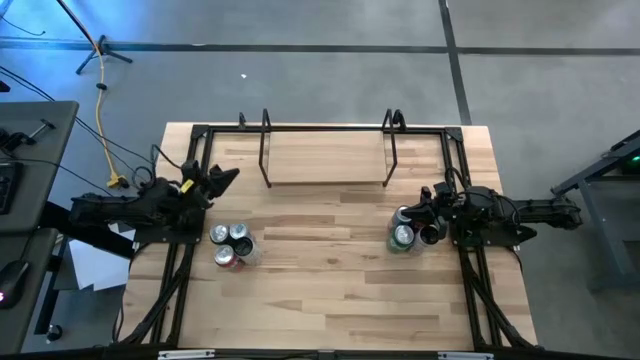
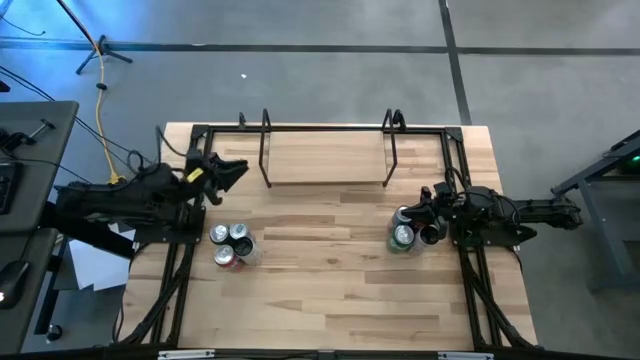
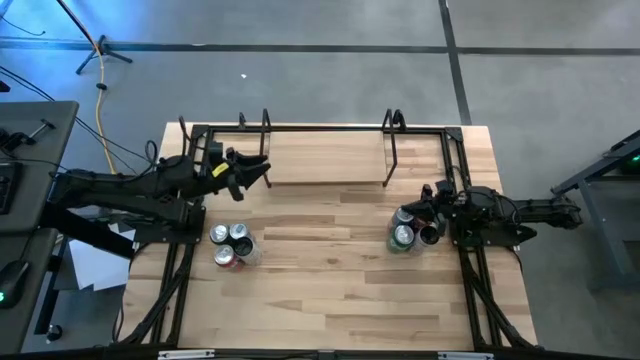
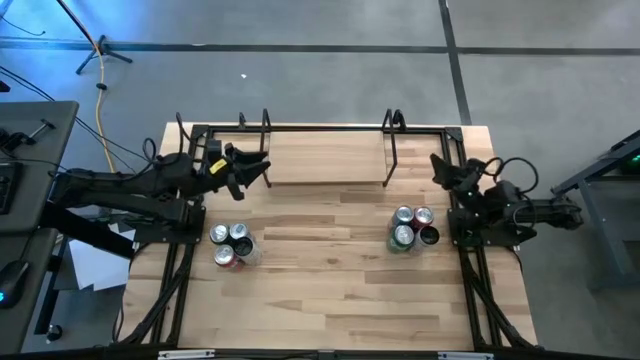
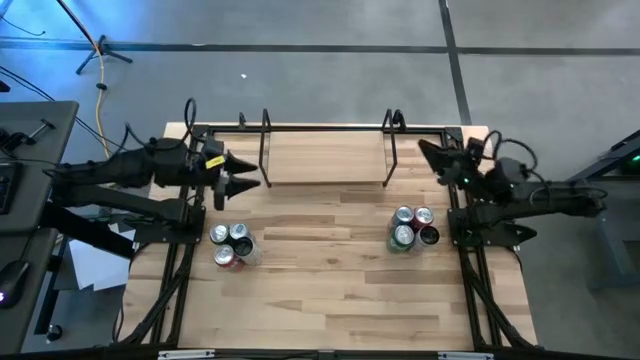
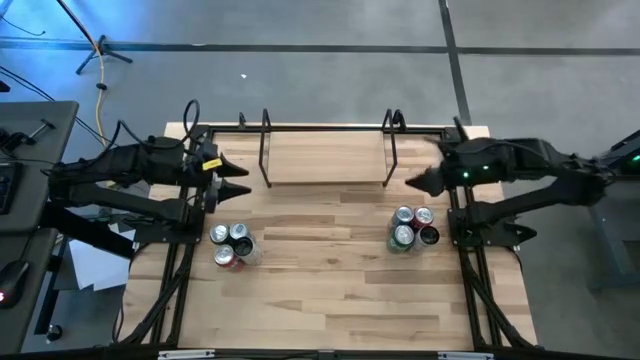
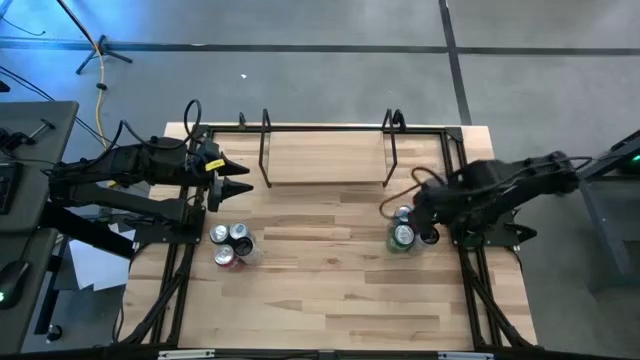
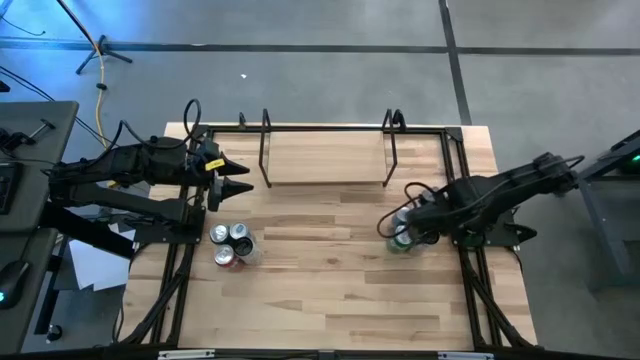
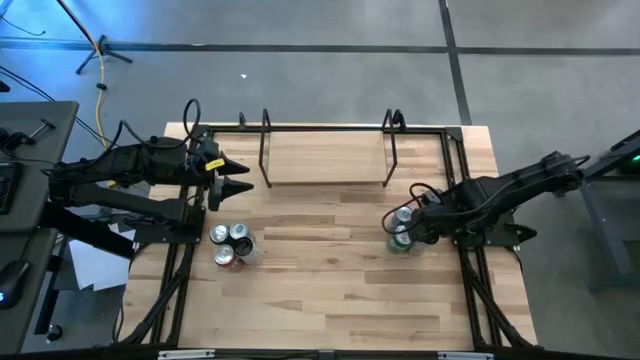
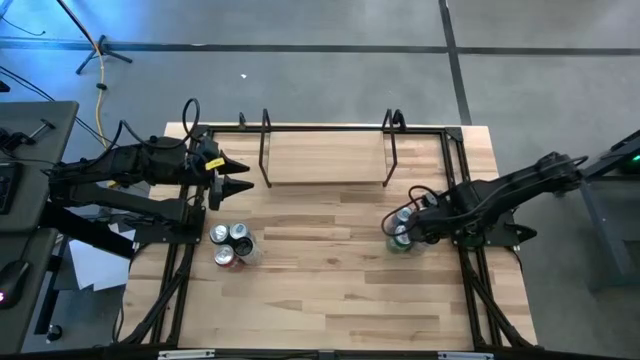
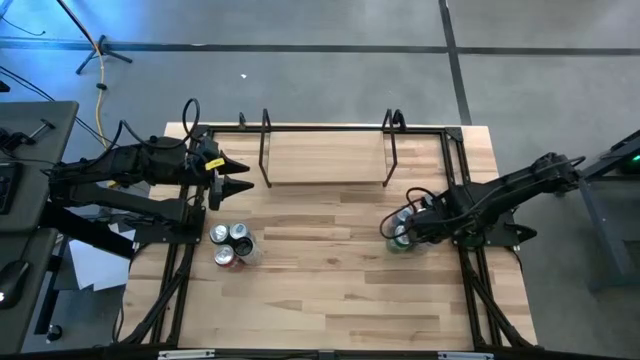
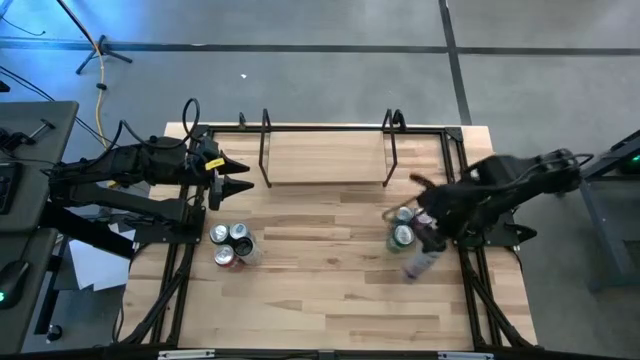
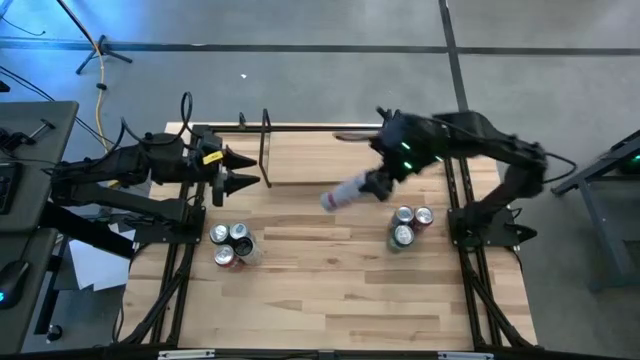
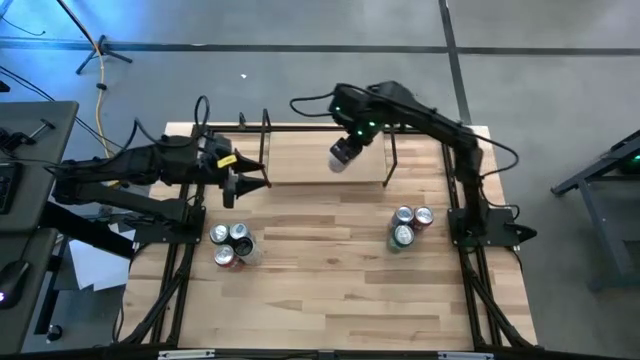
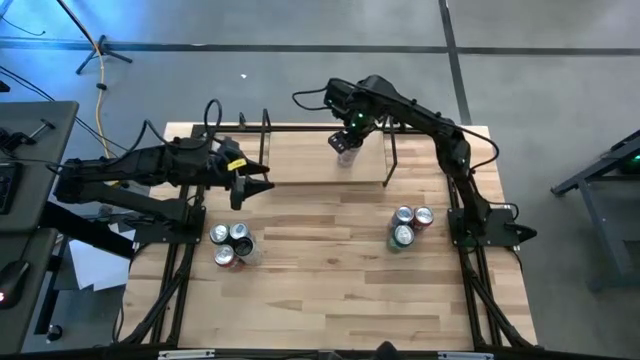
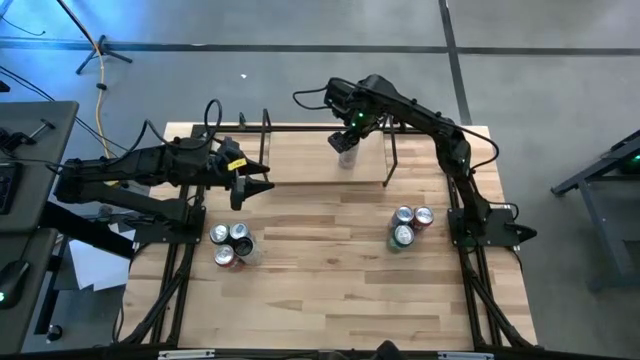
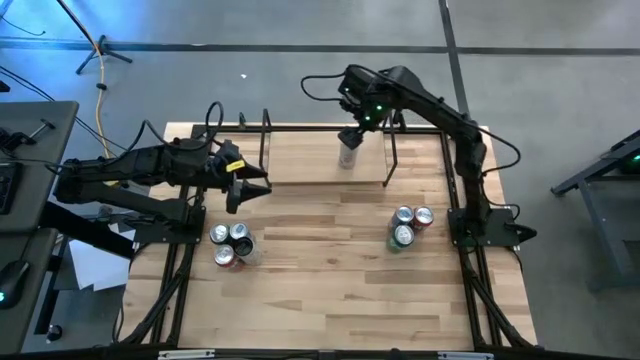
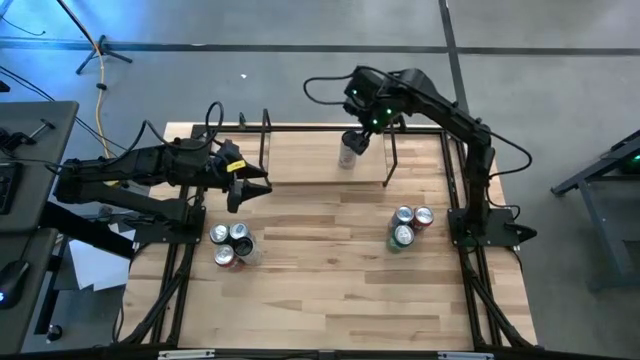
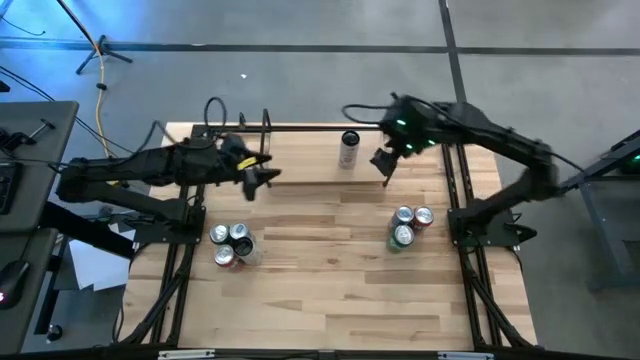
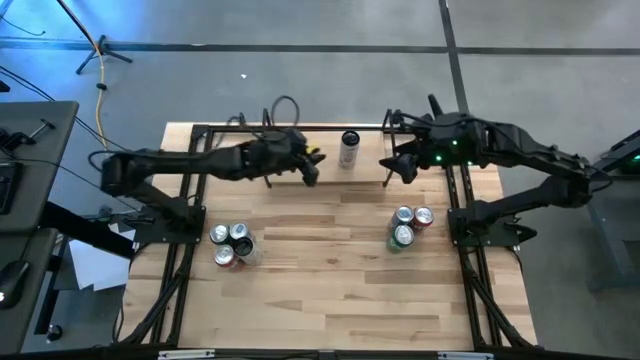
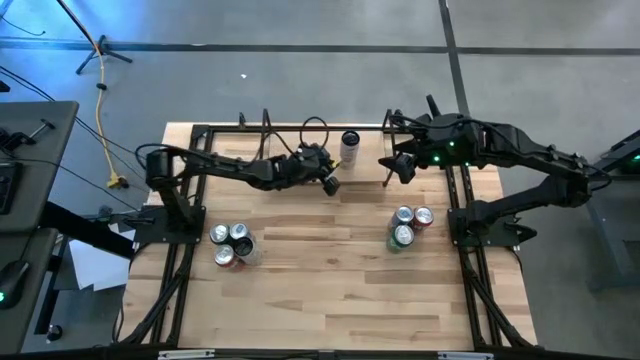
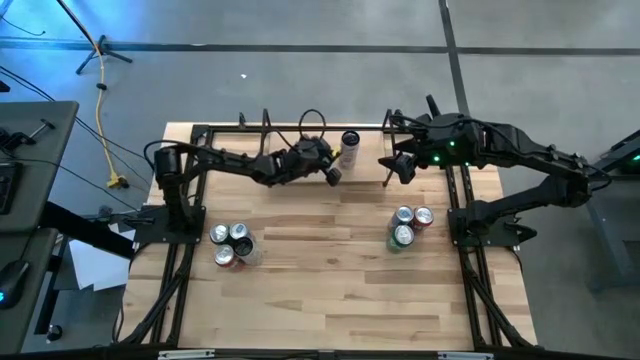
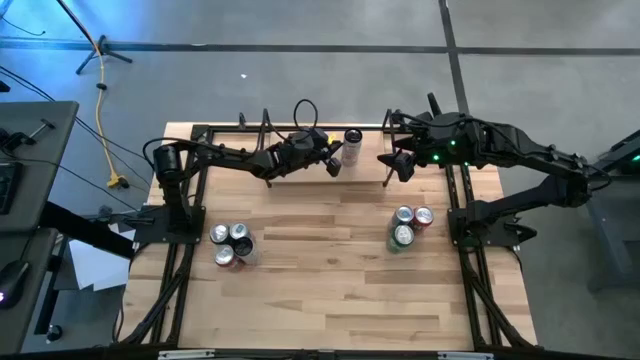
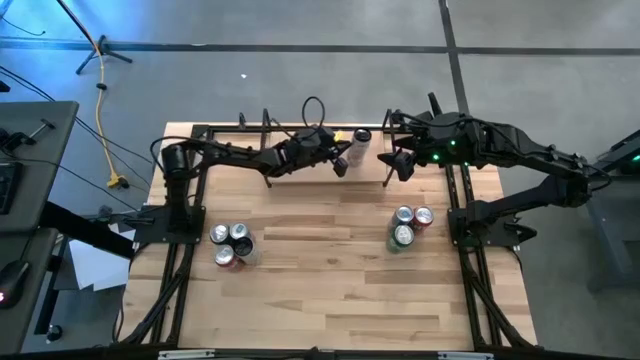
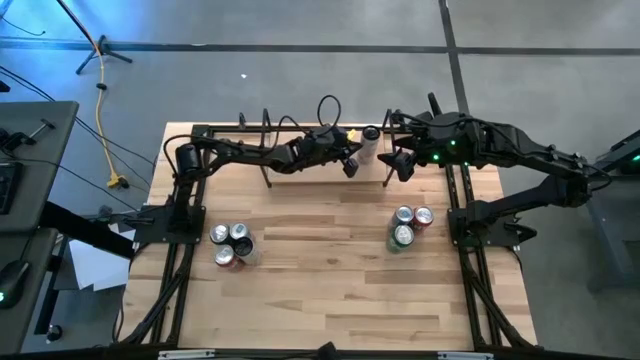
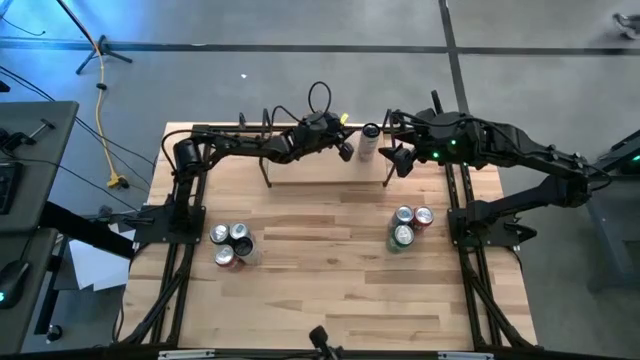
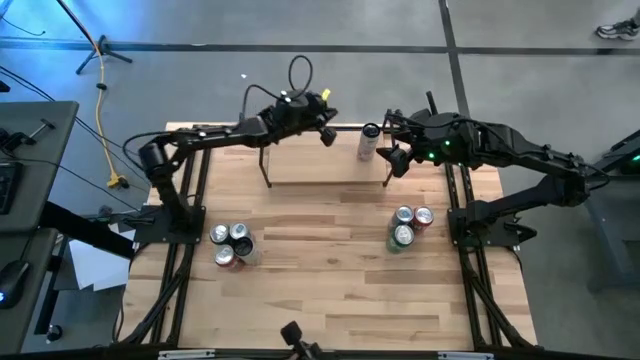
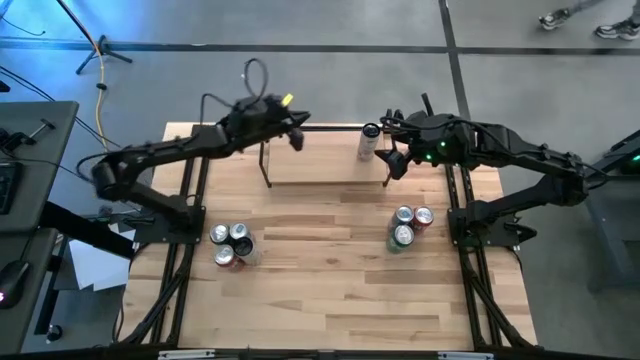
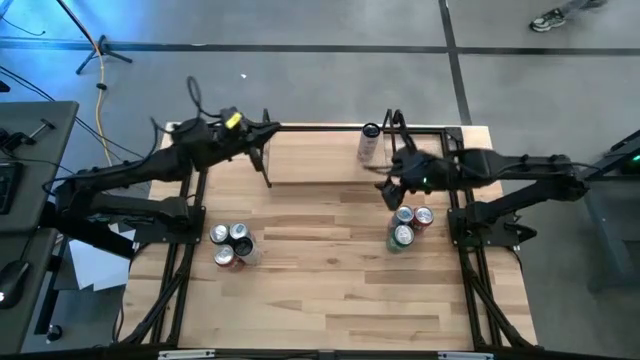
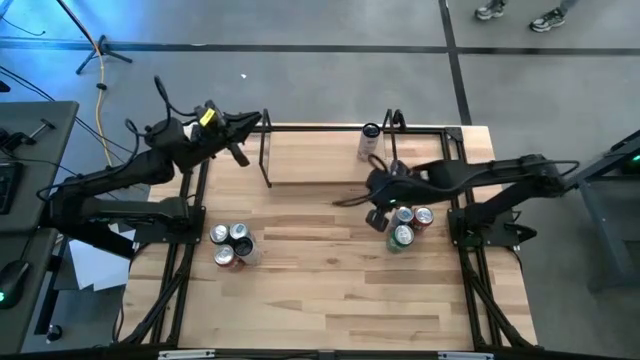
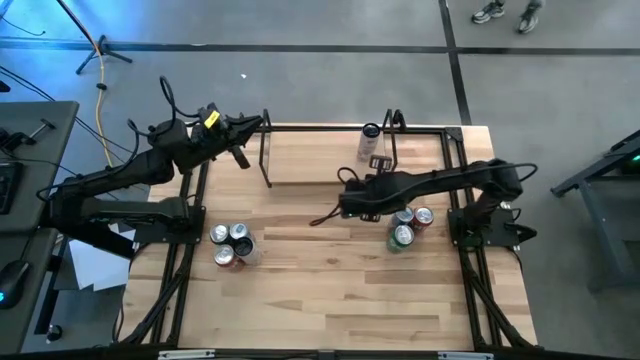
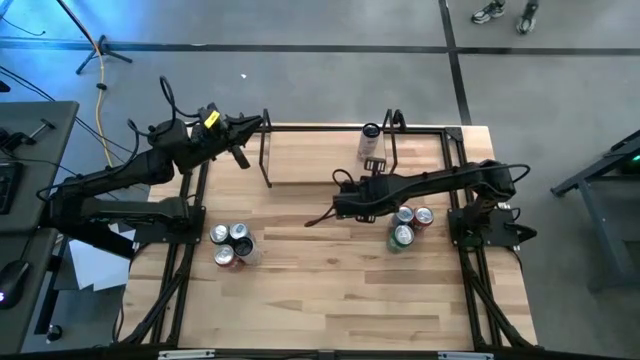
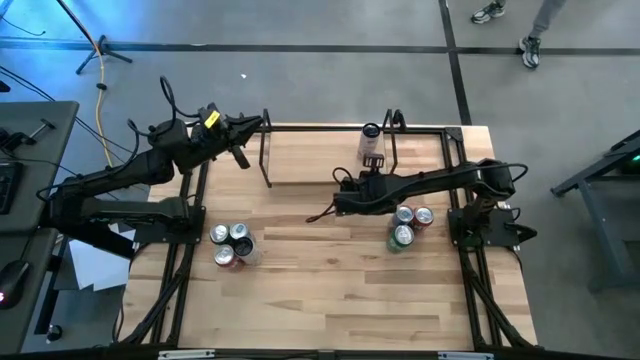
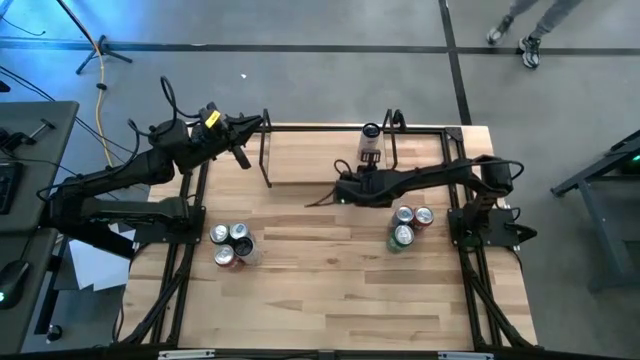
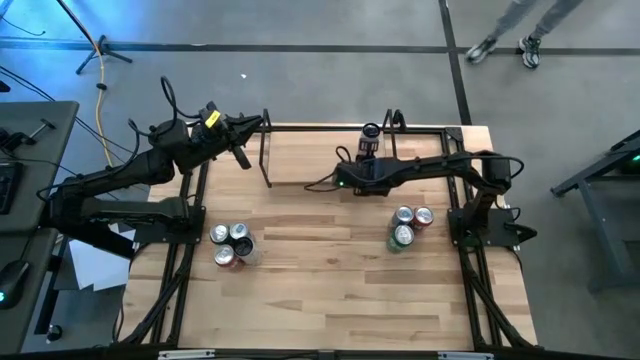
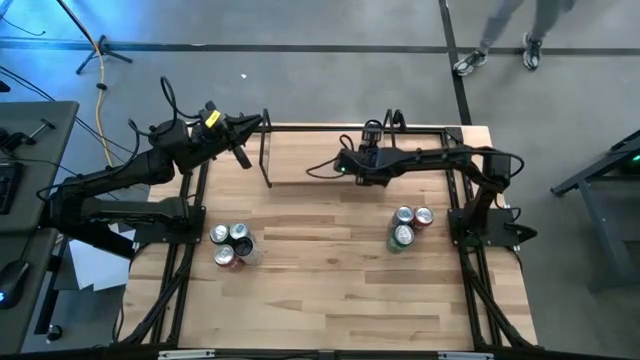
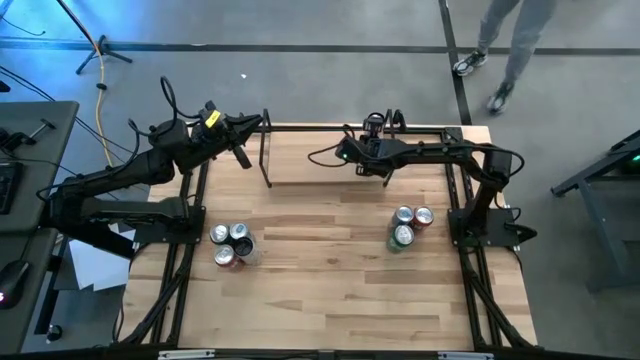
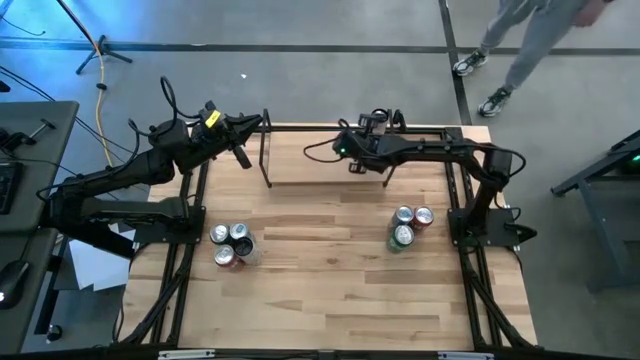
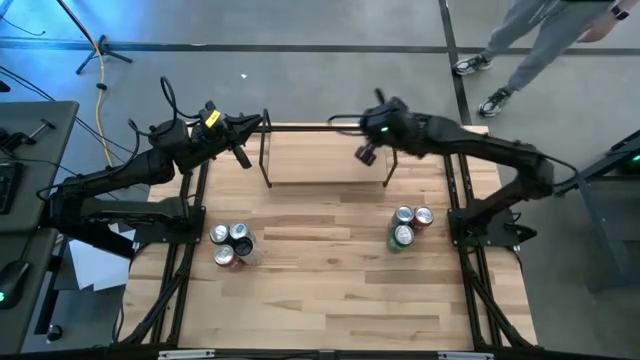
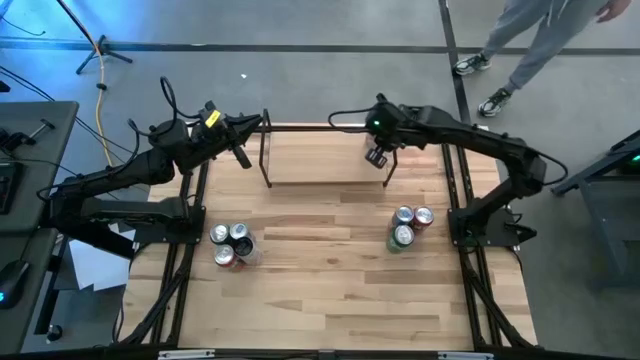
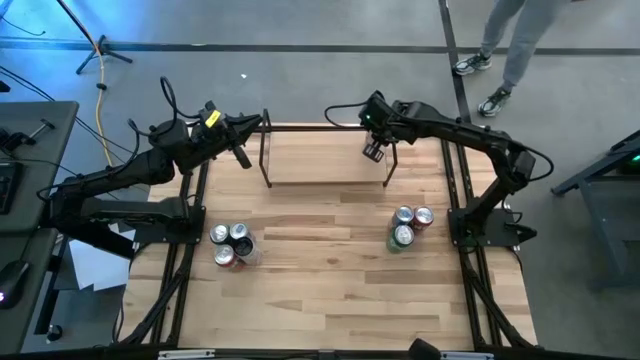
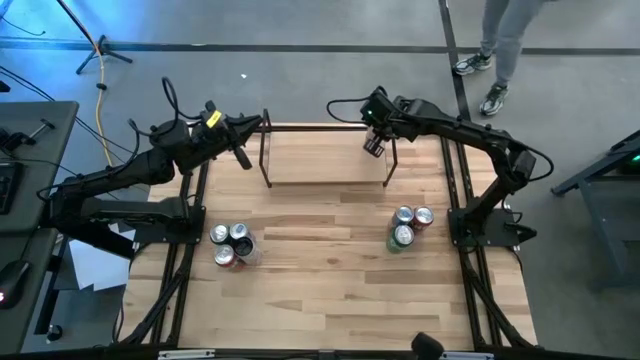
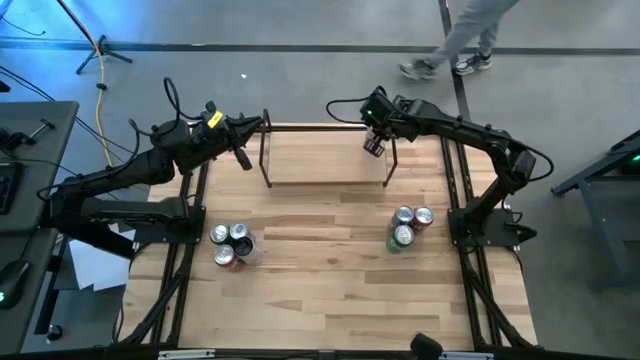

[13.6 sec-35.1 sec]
Task: Place canned beverage on shelf
Put the white soda can on the shelf
